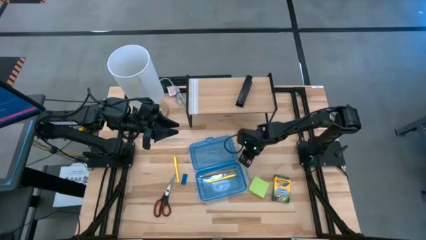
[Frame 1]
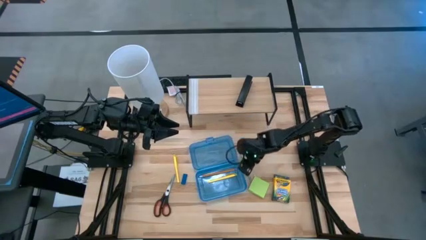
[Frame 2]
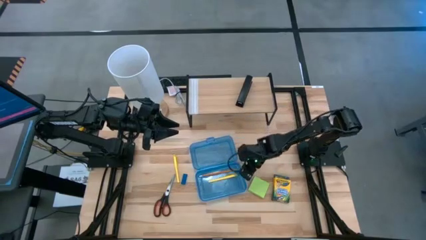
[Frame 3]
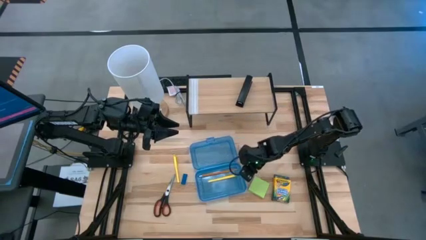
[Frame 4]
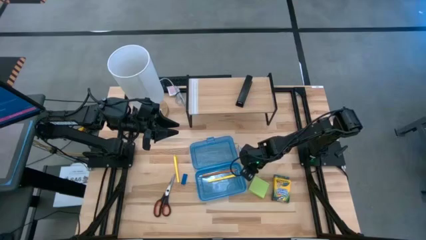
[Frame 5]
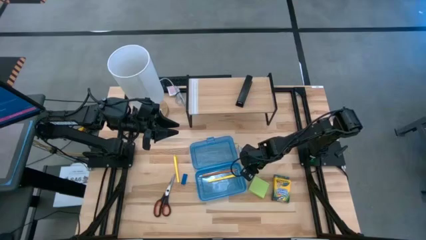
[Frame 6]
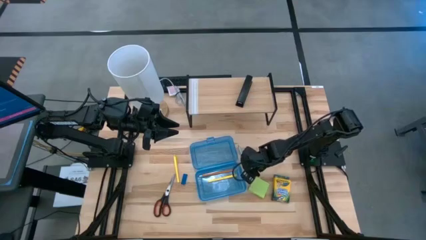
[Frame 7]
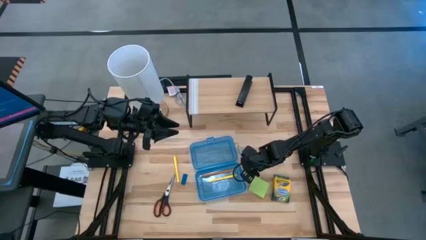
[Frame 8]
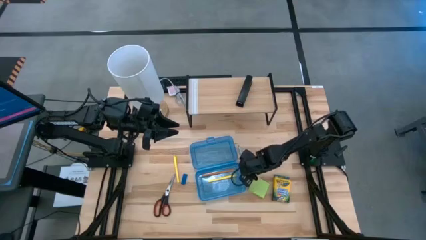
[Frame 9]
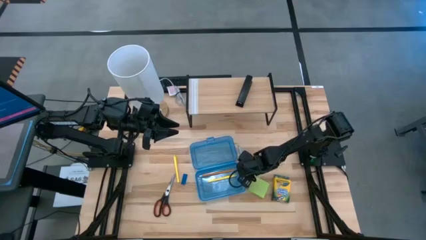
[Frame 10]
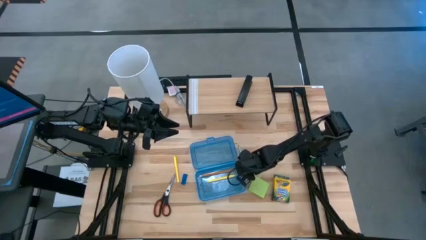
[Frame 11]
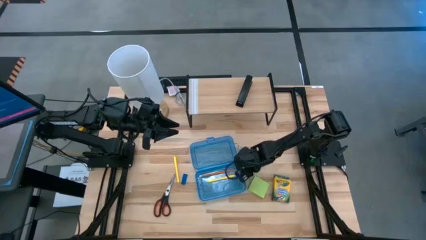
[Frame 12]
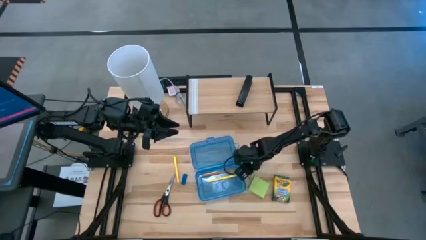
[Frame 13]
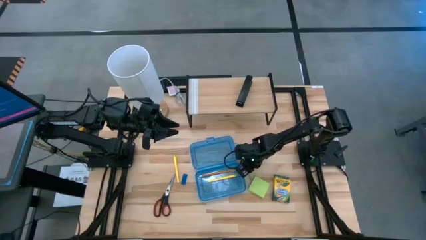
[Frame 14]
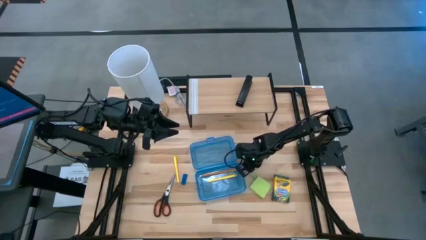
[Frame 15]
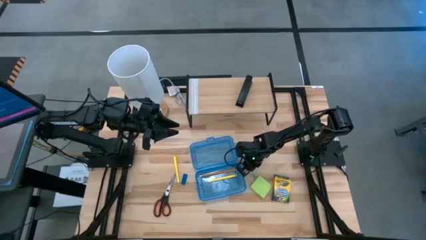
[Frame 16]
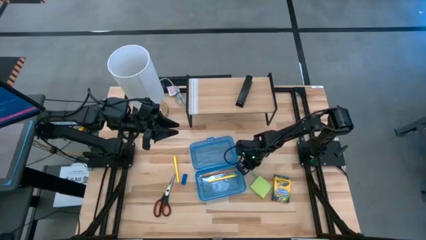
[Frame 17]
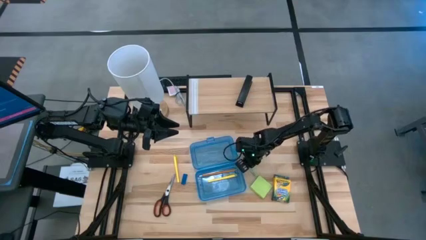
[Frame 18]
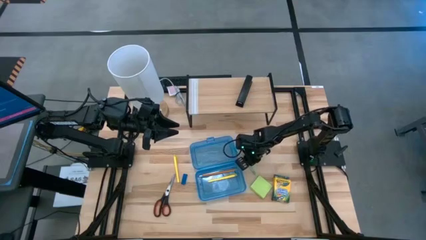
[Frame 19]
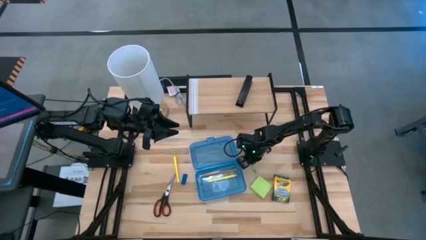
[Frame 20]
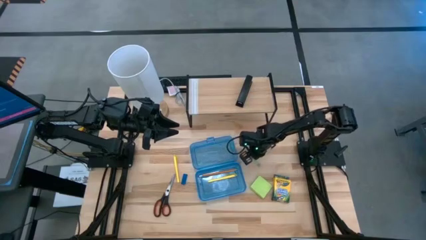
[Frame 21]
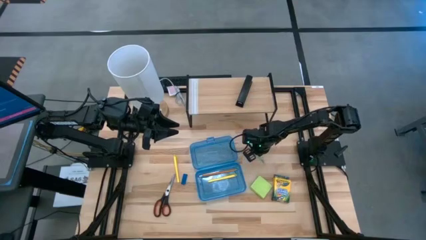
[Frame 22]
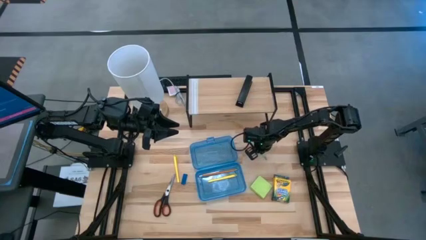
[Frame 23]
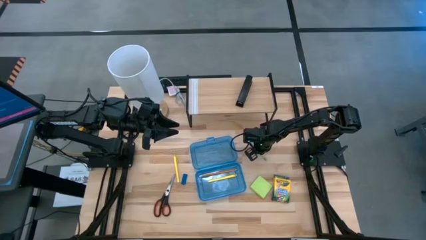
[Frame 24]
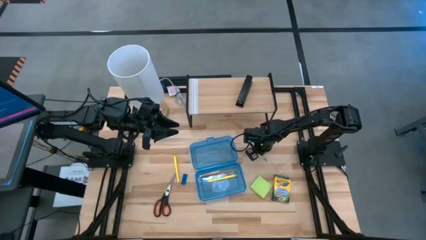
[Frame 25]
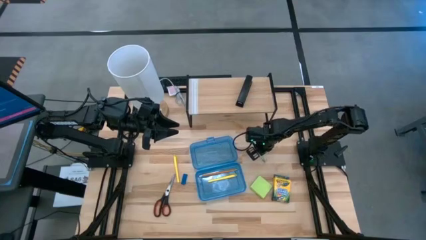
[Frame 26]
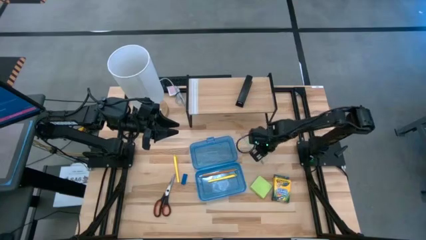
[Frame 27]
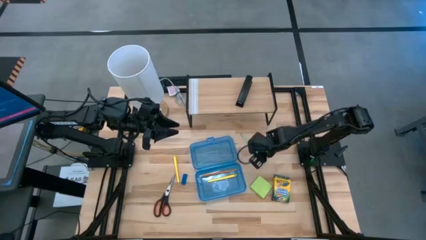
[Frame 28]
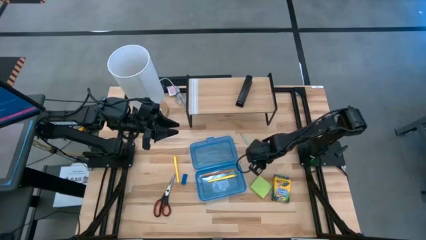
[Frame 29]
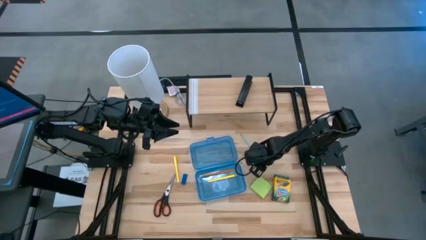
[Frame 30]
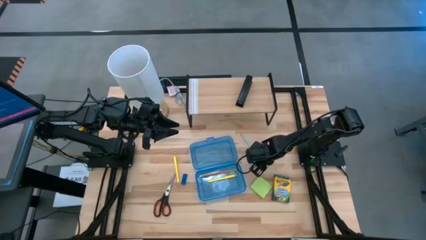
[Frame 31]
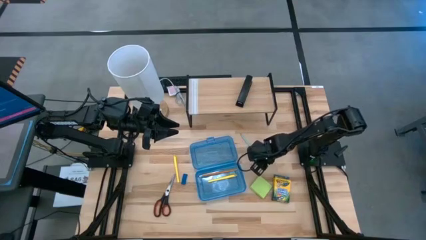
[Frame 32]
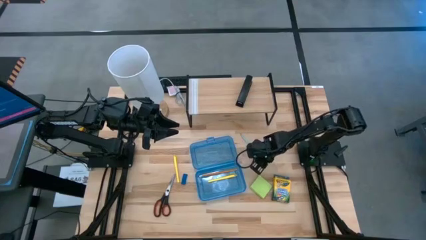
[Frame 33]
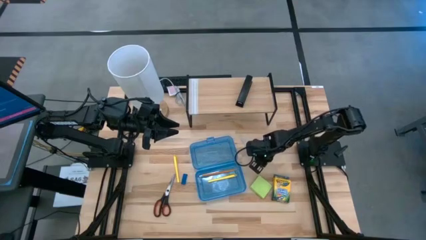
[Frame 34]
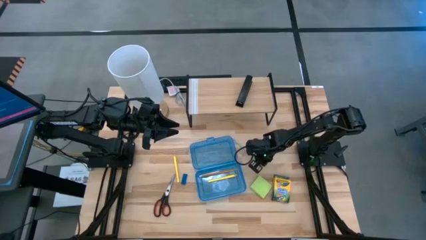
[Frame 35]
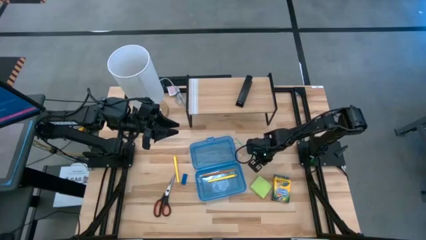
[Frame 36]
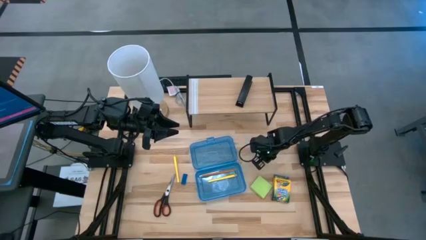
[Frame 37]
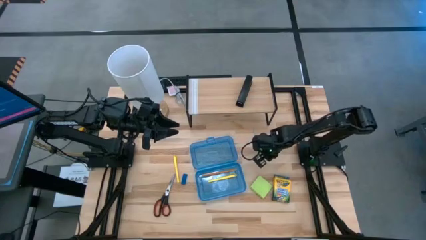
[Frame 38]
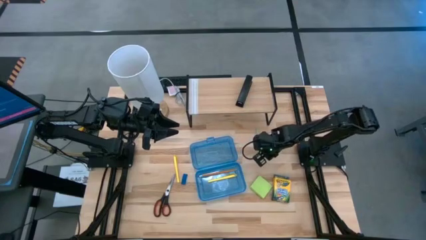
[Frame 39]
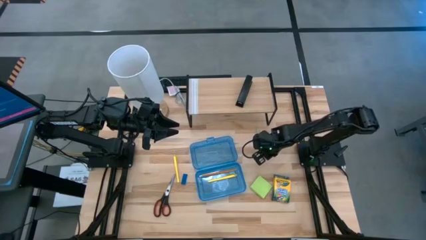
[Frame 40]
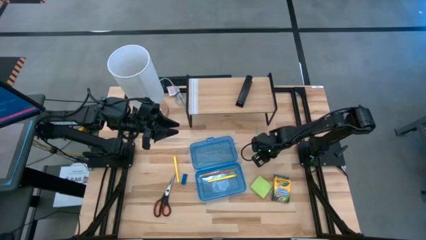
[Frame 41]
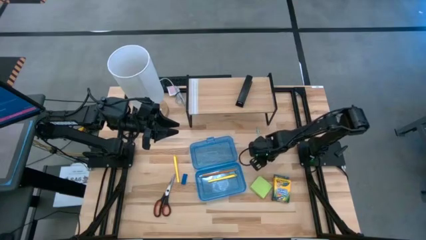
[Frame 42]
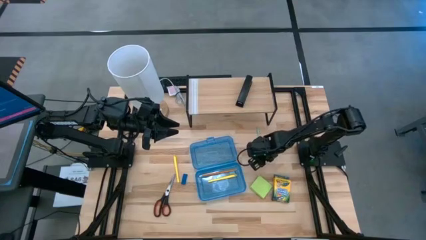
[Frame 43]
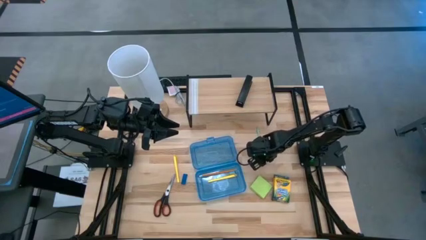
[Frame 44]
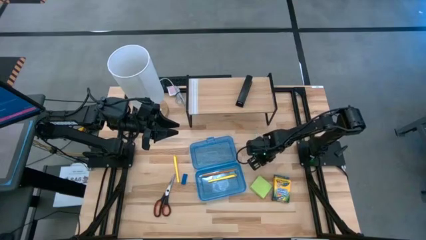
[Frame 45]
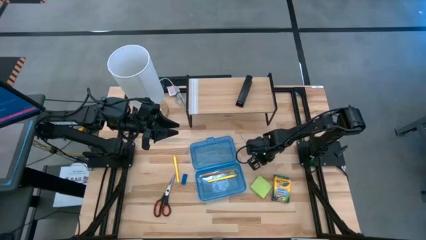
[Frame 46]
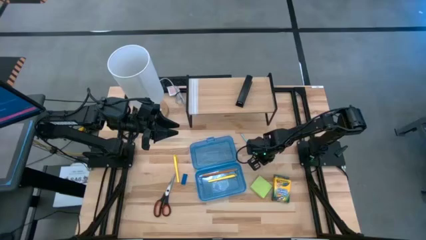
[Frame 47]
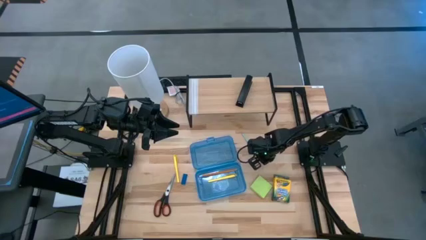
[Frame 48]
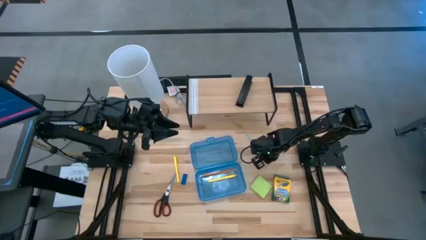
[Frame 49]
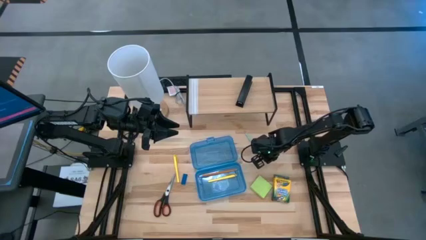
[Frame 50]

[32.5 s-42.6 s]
Task: Pack school essentials
Put the blue pencil into the blue supply box

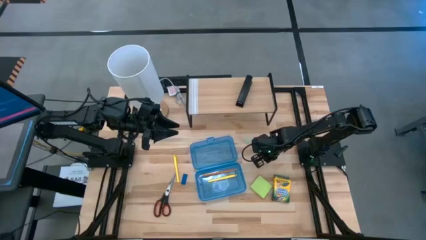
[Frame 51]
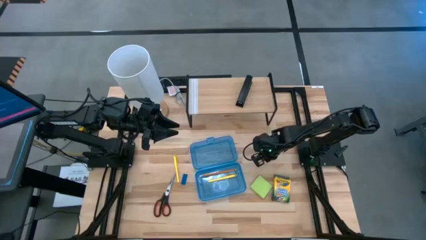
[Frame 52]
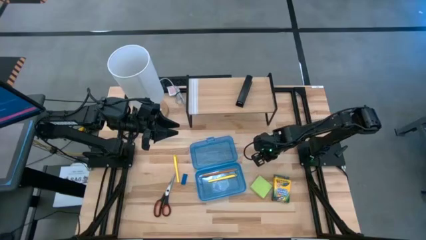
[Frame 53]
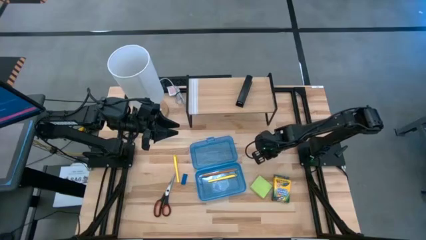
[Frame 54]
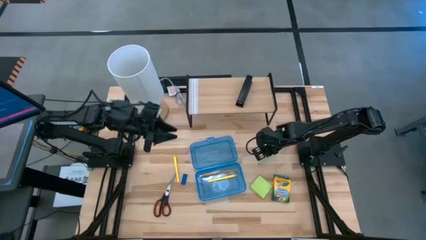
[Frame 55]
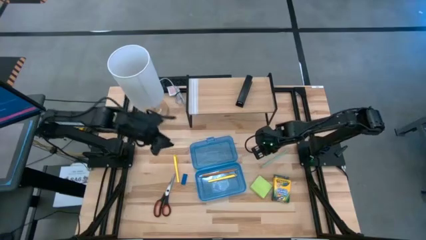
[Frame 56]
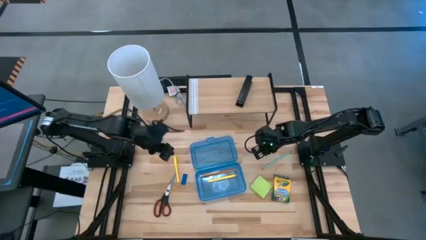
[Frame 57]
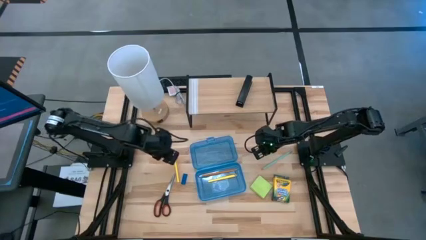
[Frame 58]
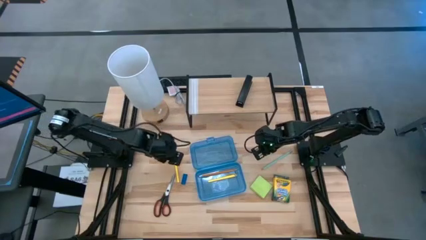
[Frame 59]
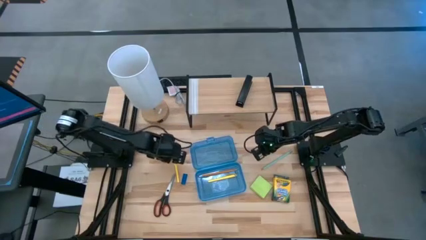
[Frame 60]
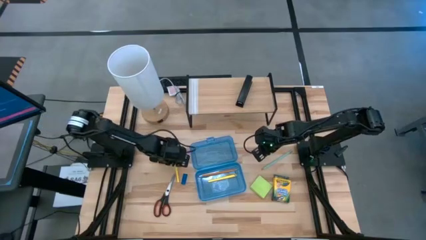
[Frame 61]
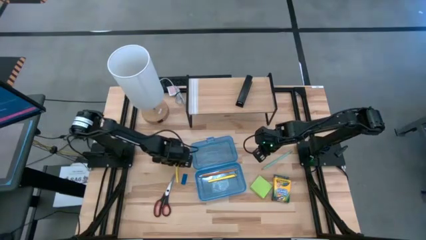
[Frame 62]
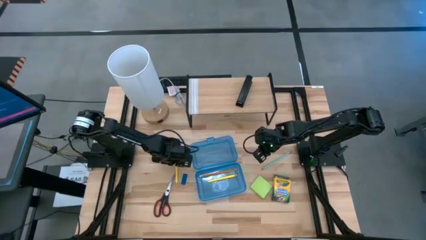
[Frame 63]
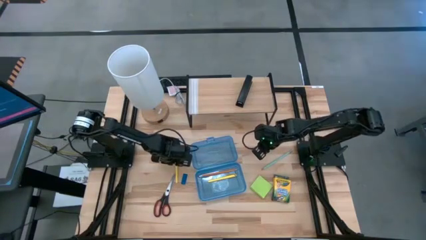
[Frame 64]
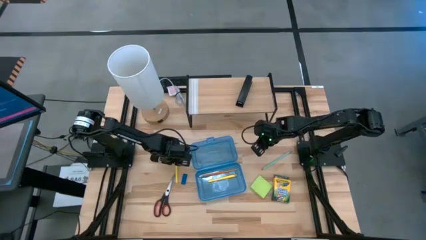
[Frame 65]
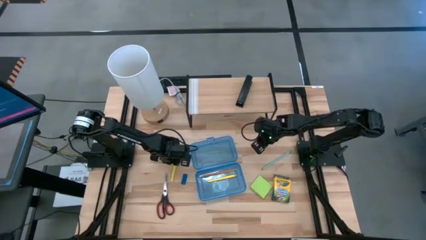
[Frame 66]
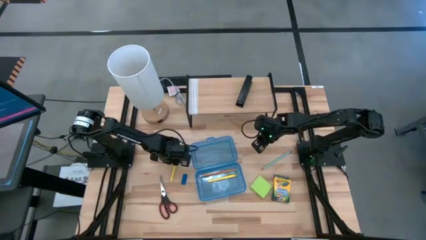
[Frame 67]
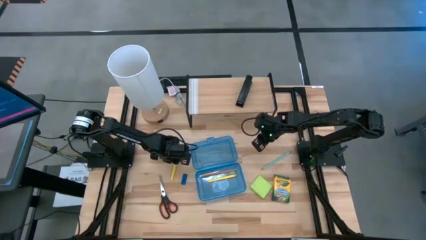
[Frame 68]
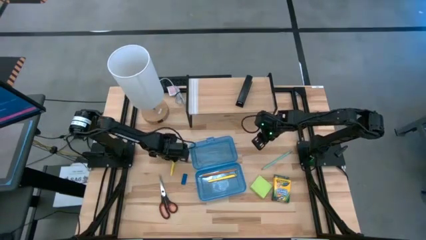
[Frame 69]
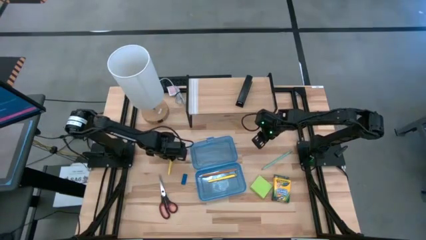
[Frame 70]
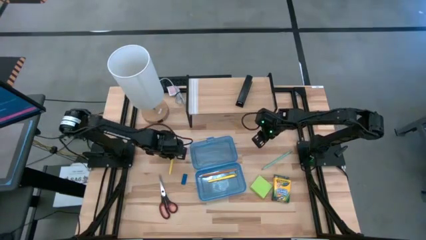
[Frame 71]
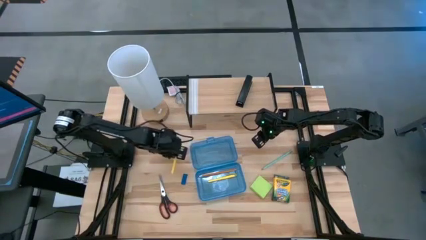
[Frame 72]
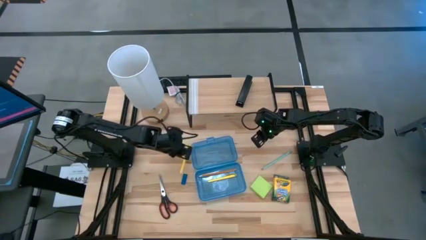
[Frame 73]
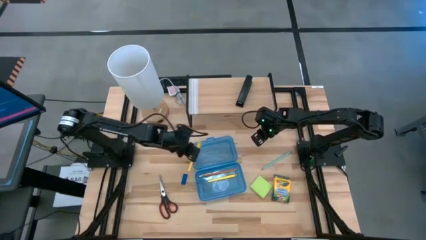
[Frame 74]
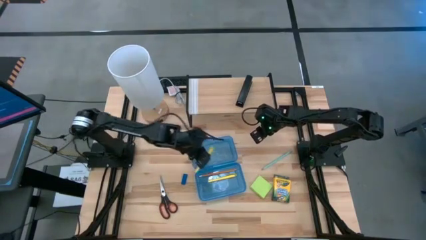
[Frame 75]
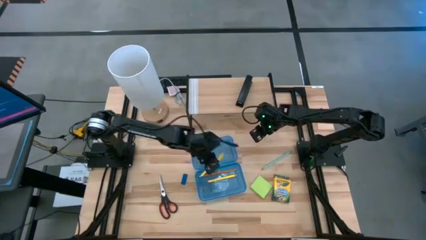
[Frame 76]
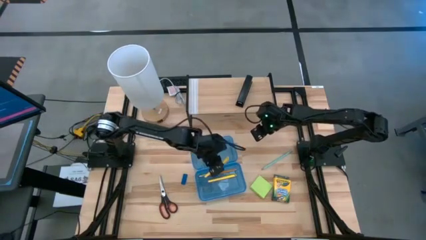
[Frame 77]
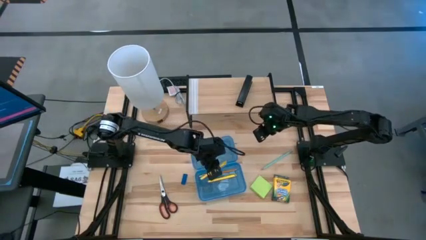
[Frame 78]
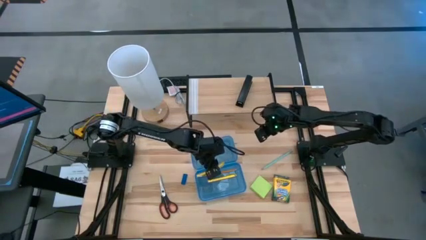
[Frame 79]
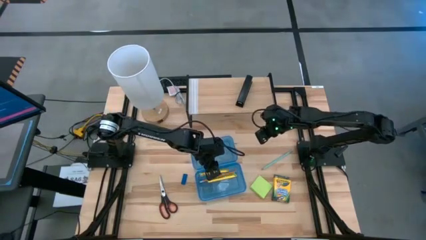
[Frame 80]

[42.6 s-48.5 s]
Put the yellow pen into the blue supply box
